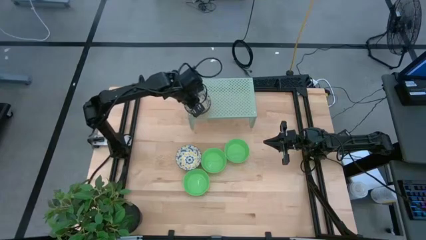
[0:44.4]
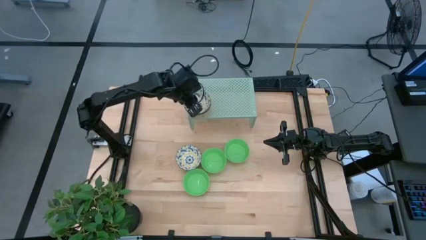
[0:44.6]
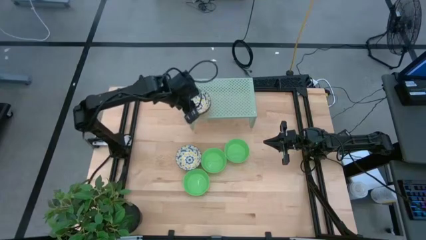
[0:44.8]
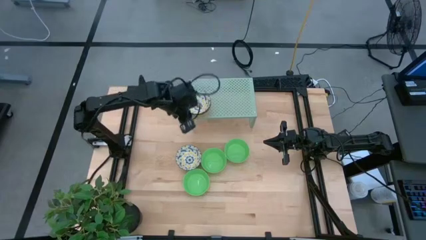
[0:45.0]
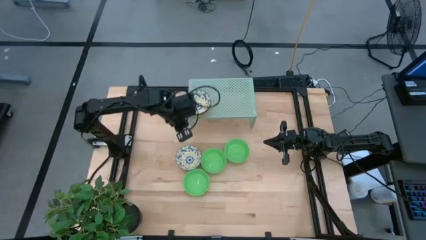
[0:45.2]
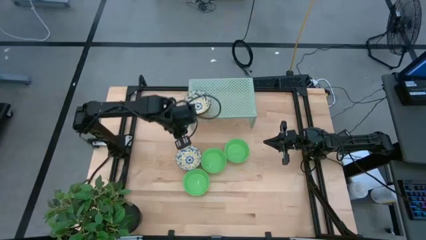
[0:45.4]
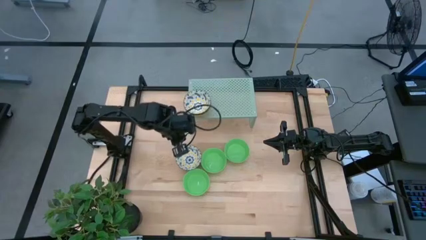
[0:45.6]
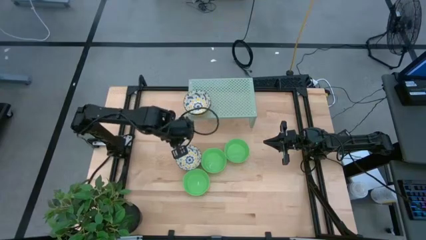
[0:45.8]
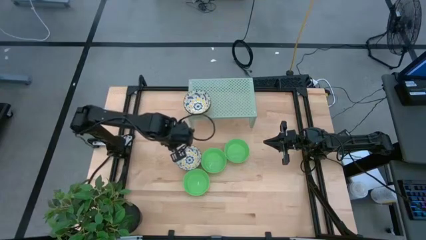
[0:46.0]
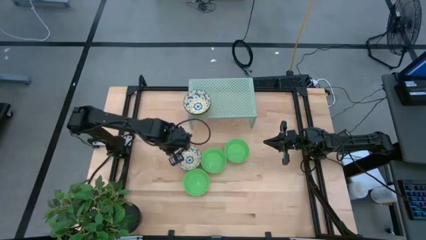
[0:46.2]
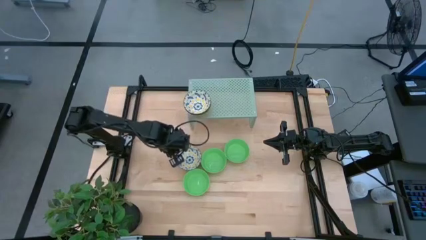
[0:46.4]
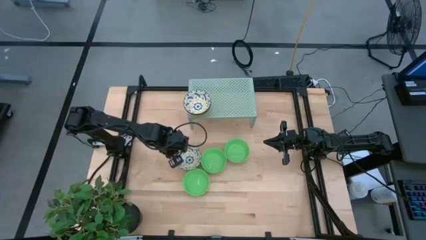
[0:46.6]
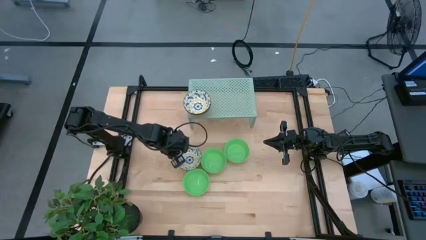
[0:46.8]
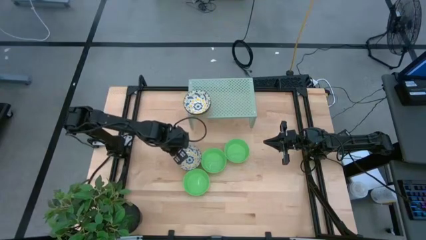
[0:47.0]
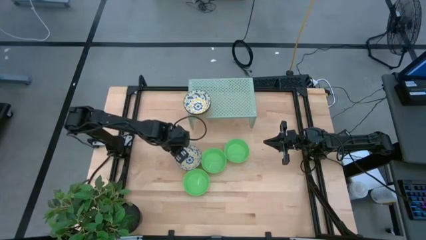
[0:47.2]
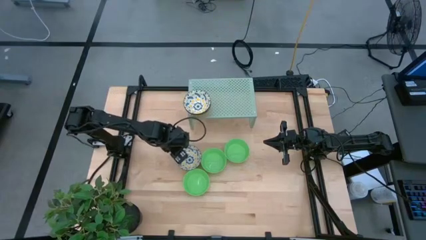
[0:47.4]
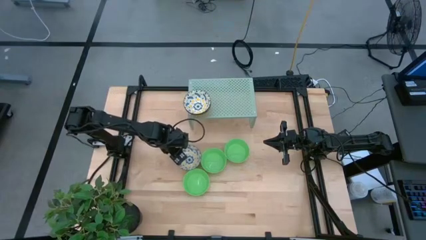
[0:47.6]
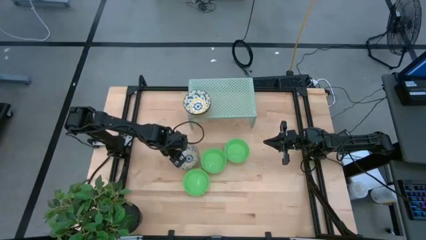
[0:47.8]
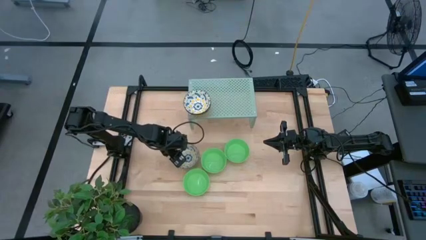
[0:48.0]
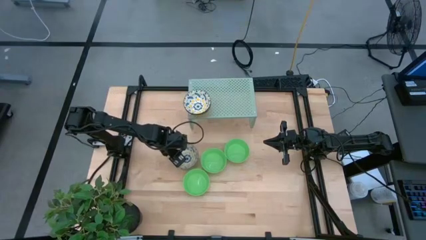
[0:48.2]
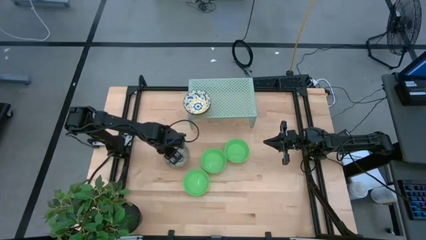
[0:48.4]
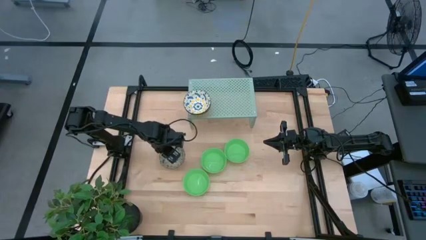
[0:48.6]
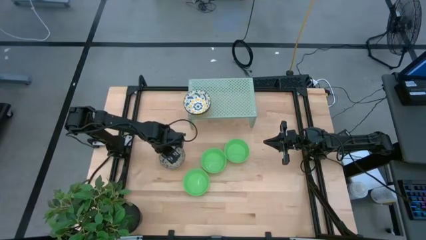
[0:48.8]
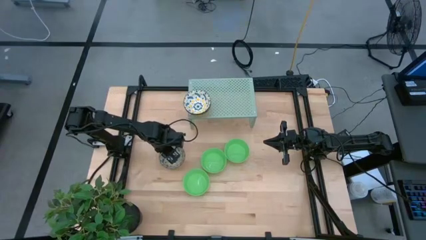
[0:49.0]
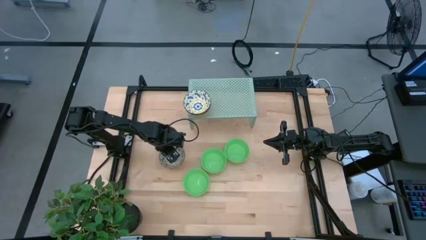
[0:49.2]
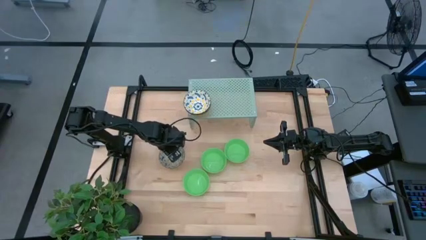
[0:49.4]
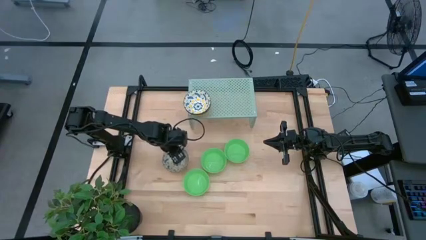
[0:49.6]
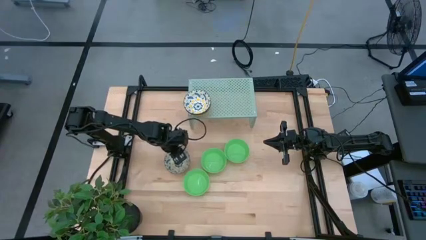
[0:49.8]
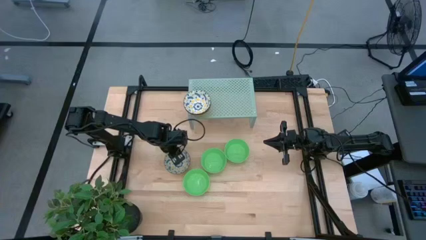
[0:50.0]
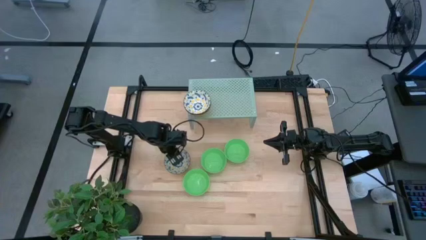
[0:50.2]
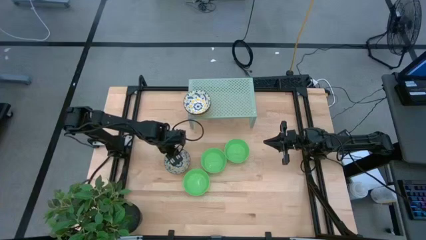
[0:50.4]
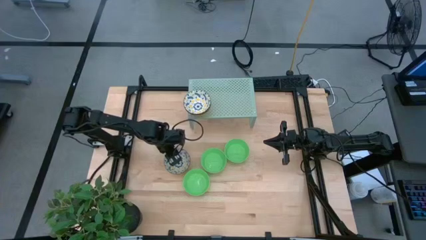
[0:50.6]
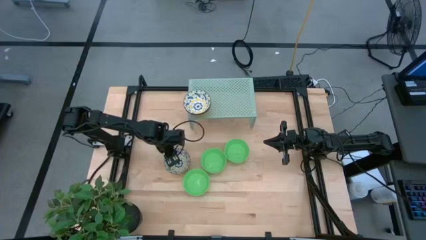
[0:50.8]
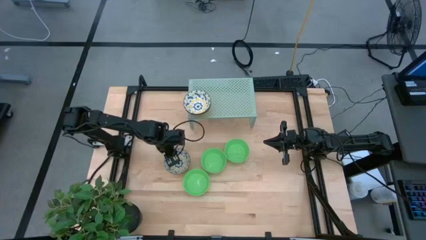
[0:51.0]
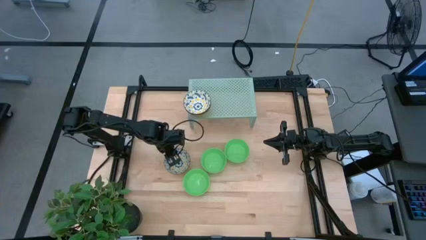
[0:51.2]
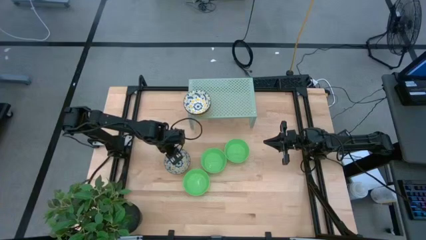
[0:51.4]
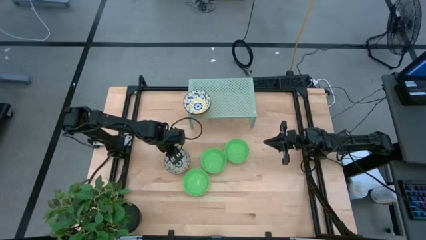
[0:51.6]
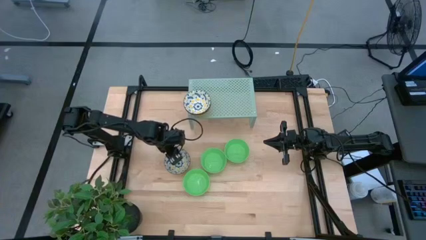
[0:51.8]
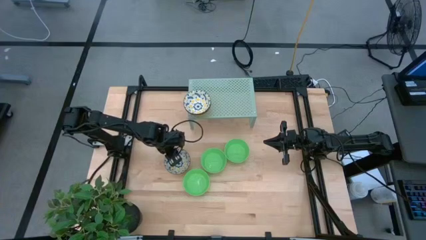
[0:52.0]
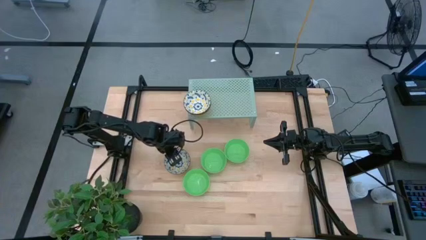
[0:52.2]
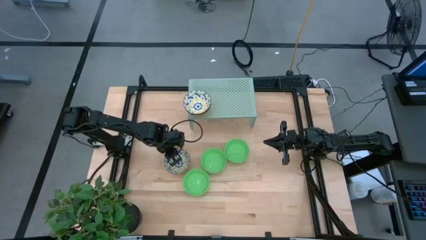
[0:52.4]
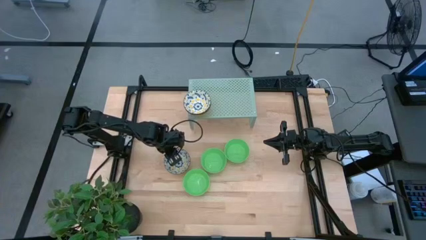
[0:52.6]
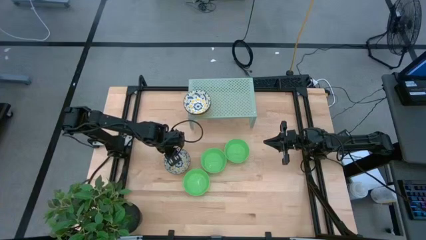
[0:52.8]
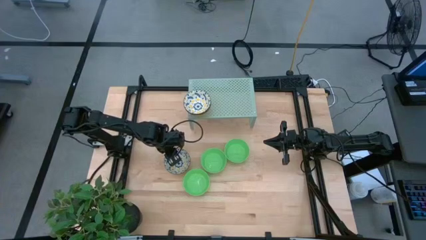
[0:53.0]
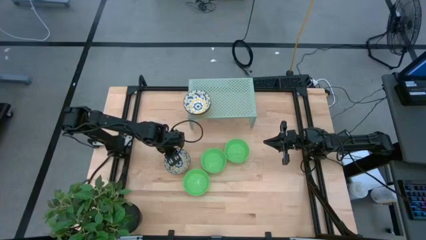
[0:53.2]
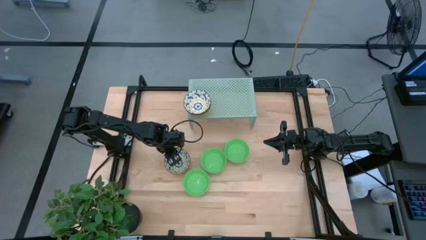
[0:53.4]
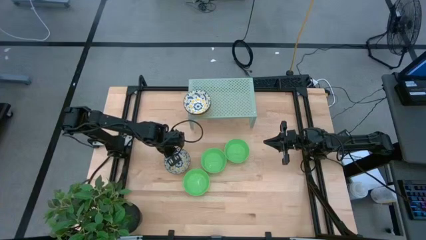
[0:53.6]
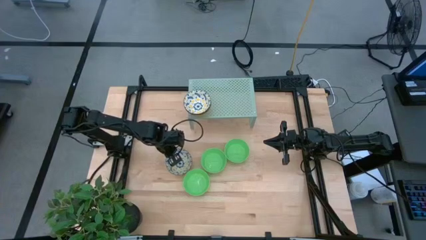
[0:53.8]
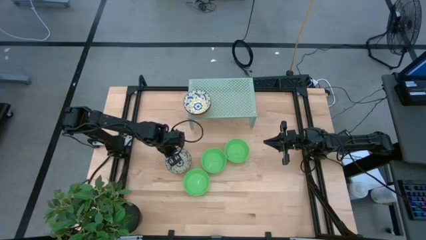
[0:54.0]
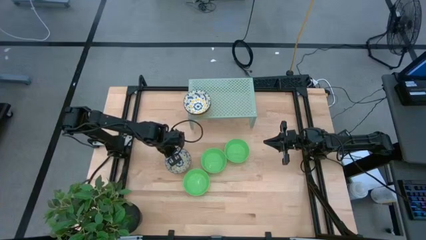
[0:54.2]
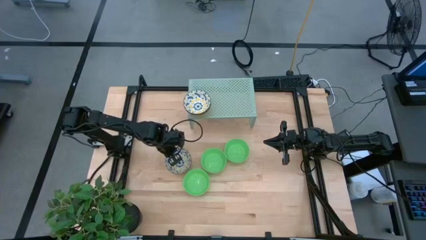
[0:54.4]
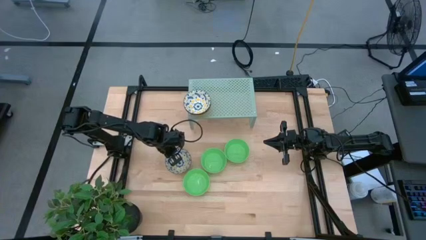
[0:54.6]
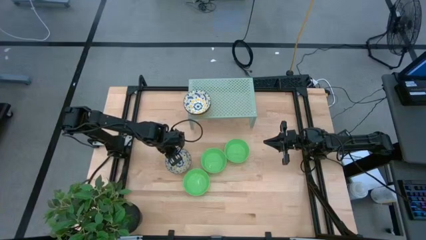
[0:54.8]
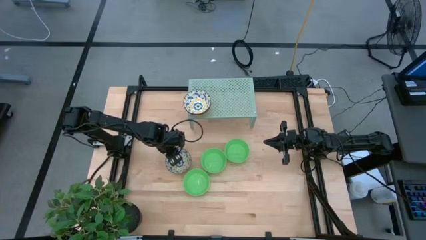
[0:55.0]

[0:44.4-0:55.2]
Task: Pick & Place Mini bowls
Stack the white patterned bowl on top of the white patterned bowl on the shelf

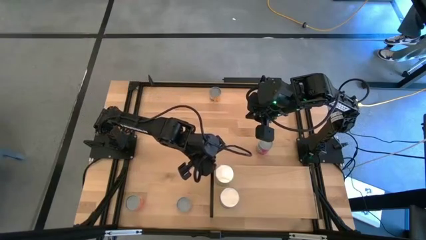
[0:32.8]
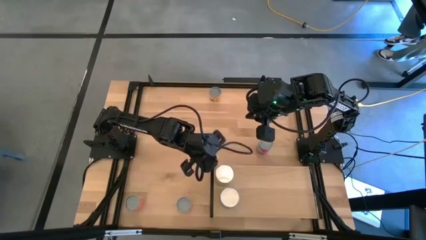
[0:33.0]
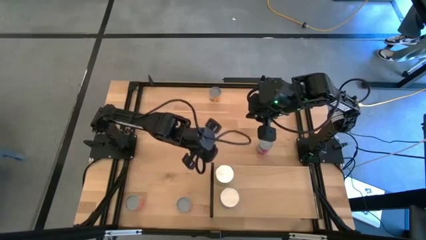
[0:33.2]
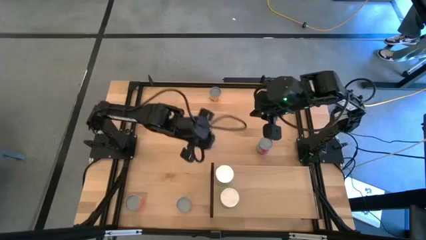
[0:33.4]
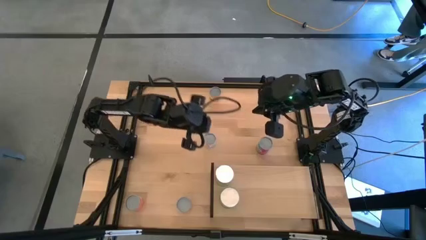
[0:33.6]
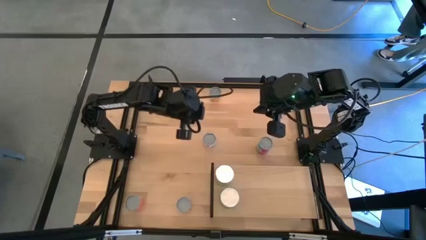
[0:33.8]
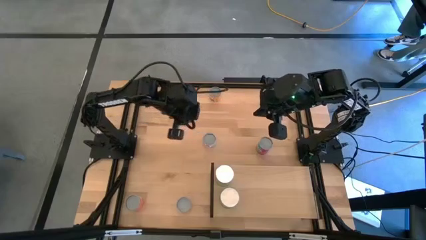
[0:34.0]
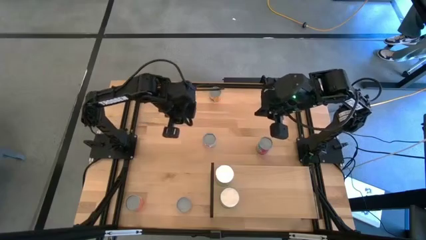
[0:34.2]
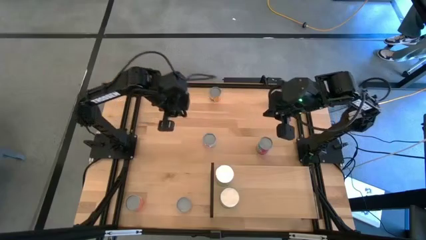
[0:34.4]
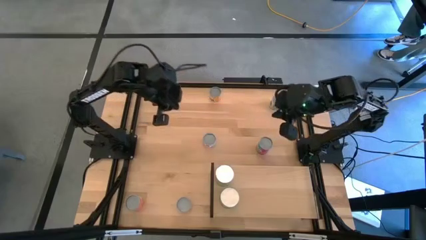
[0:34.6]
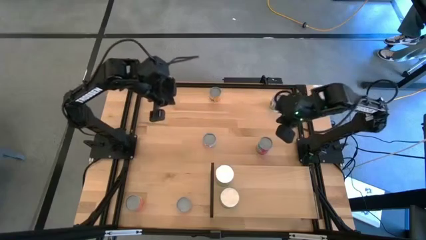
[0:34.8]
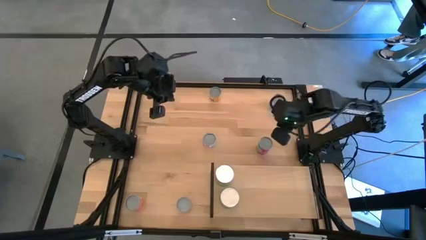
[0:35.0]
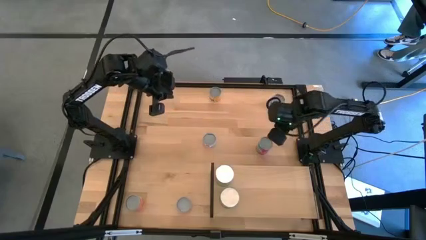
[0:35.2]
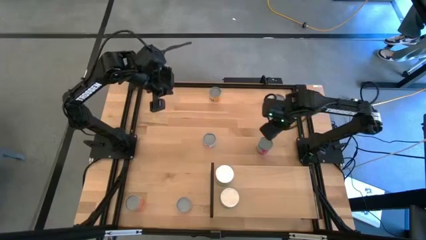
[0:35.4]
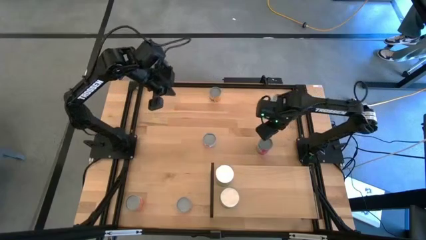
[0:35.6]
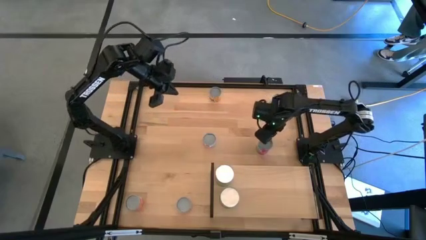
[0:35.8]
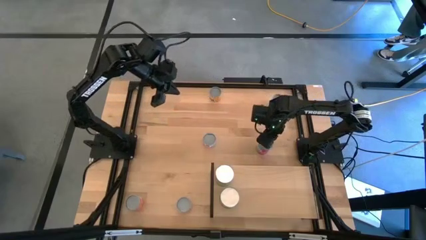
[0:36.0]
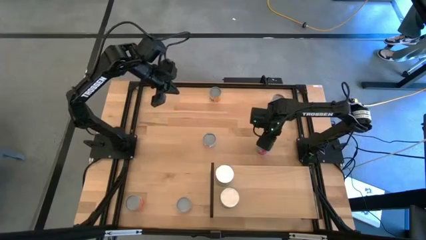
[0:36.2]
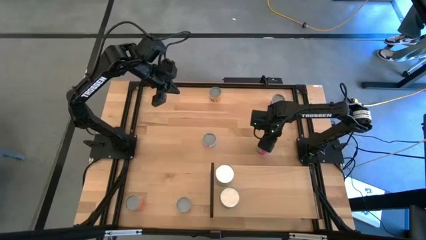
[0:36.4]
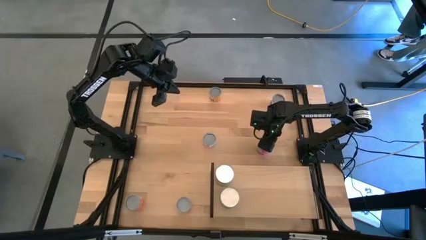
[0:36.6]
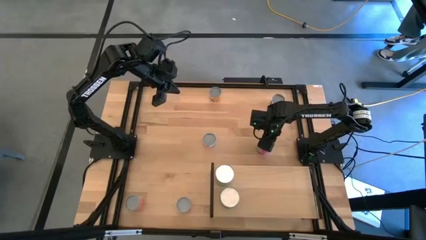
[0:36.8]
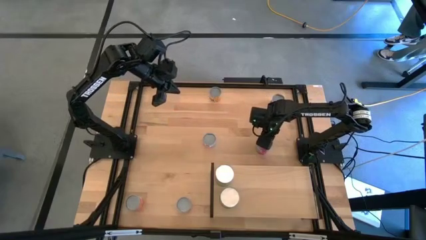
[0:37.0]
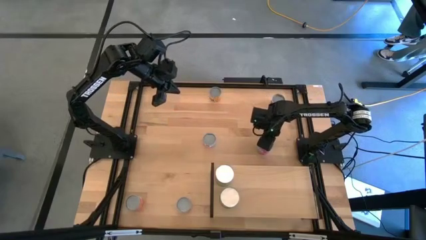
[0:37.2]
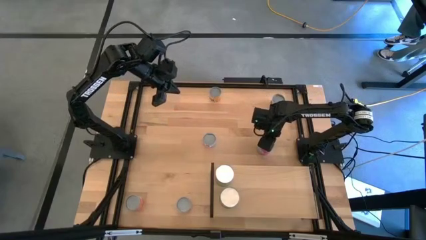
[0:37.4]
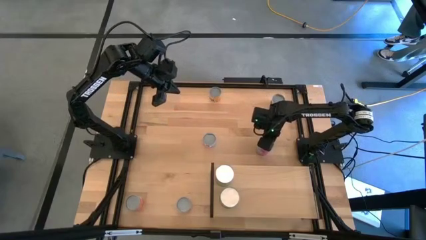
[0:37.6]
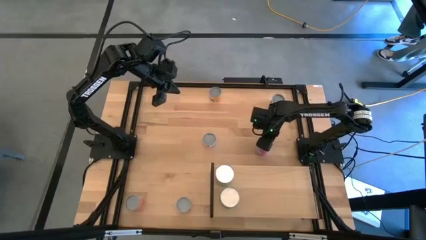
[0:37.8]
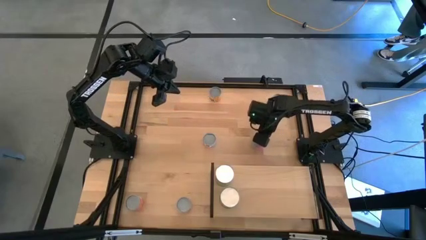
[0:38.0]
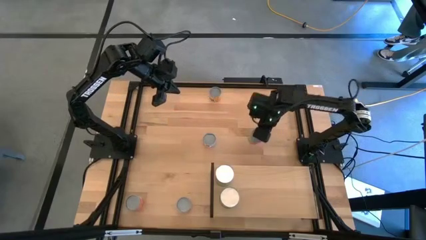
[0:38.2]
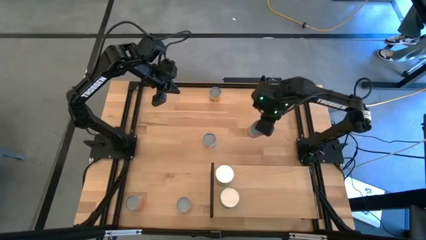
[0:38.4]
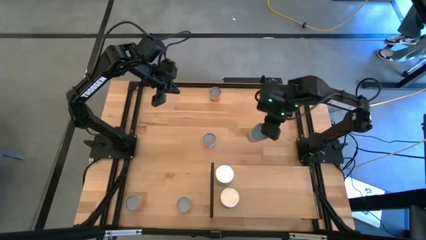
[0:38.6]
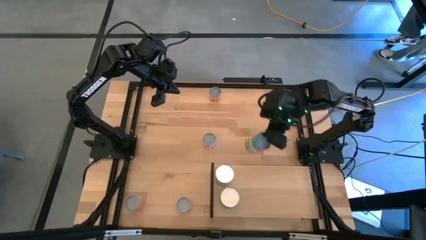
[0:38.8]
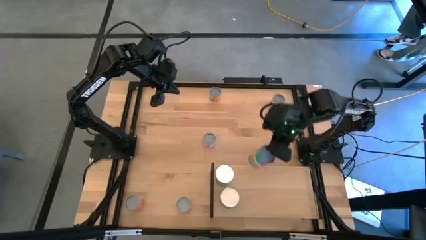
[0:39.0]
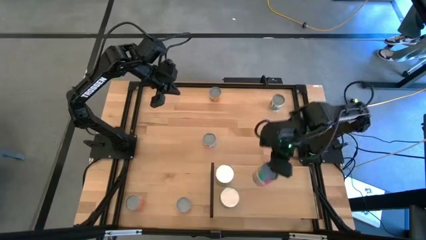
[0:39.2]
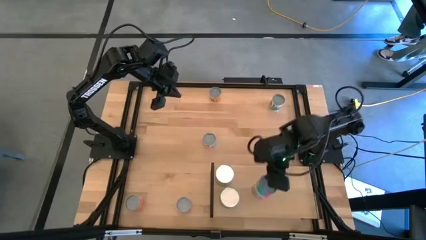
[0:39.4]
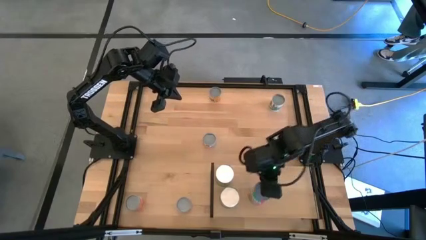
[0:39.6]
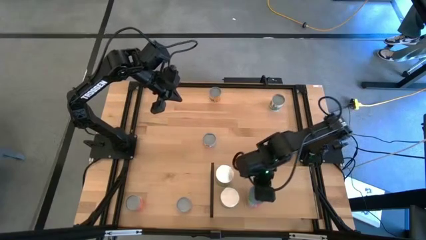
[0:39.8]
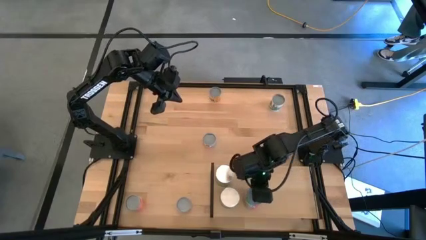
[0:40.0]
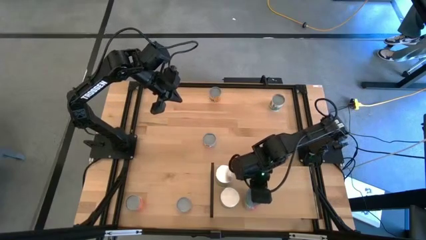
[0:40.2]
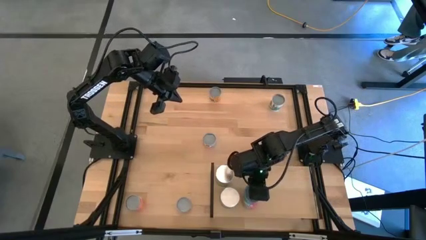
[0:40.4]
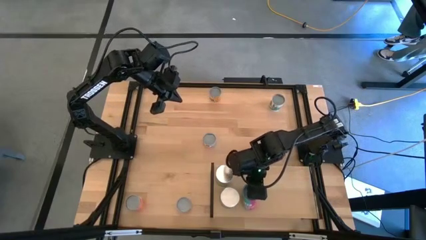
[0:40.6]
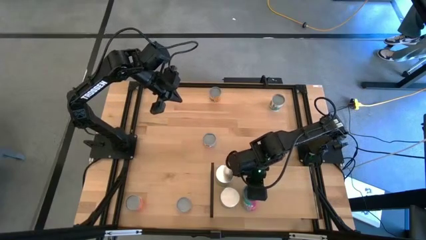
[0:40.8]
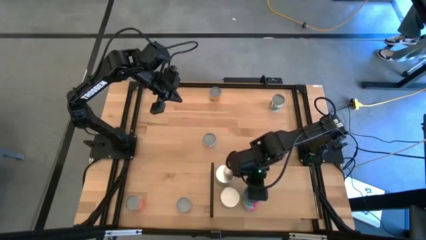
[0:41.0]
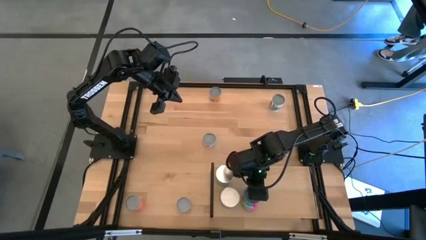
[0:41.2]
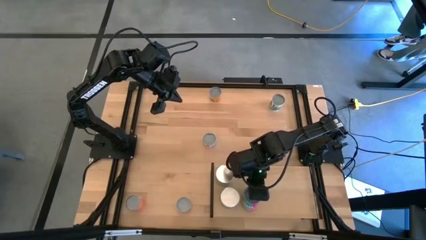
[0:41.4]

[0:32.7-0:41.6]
Task: Pick and place cans onto a shelf
Put the canned chicken soup on the shelf
